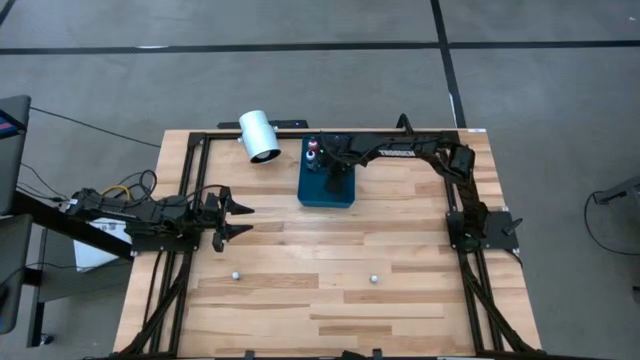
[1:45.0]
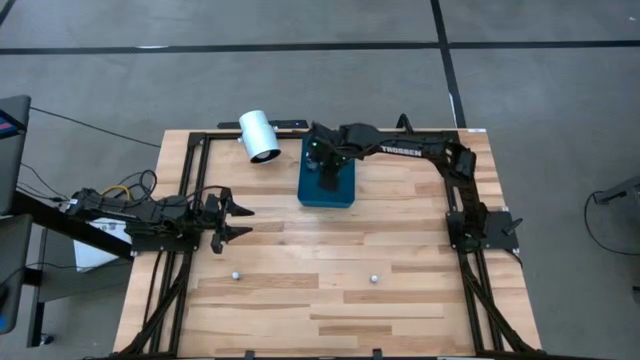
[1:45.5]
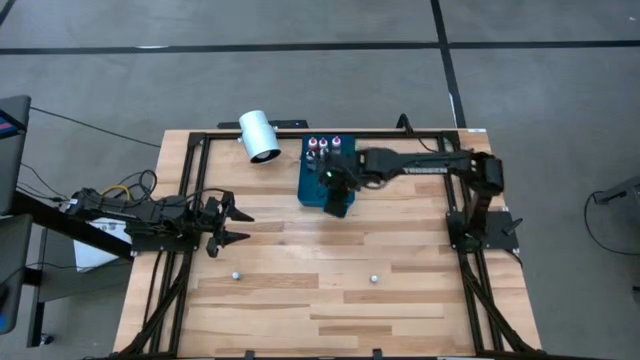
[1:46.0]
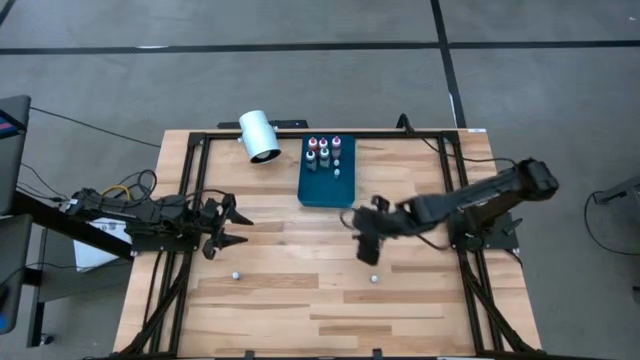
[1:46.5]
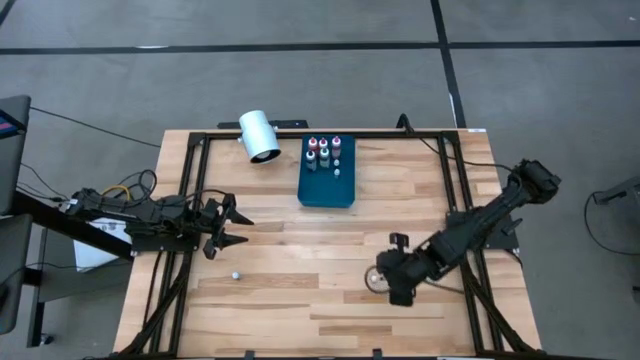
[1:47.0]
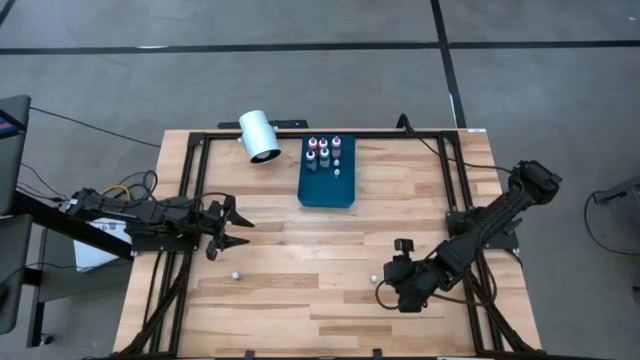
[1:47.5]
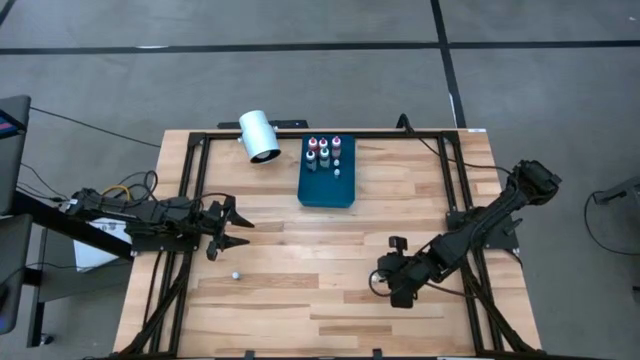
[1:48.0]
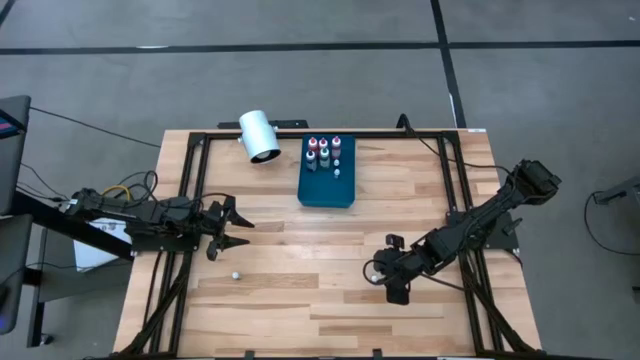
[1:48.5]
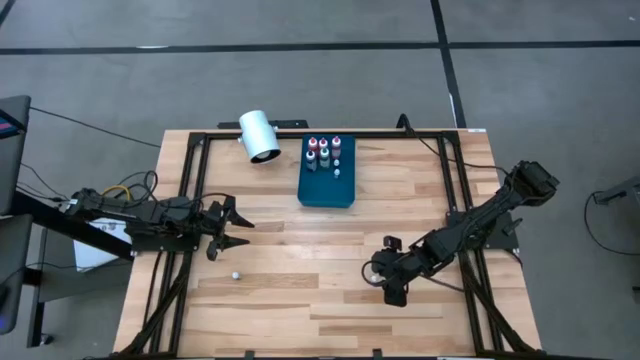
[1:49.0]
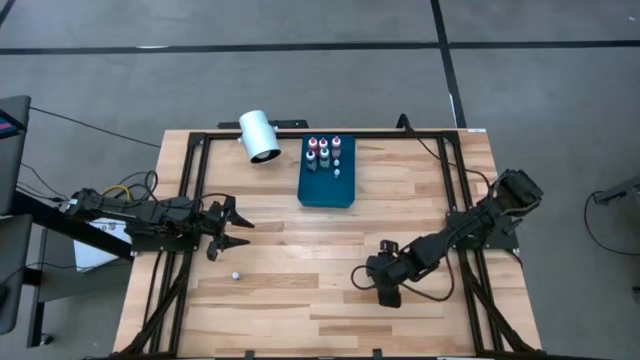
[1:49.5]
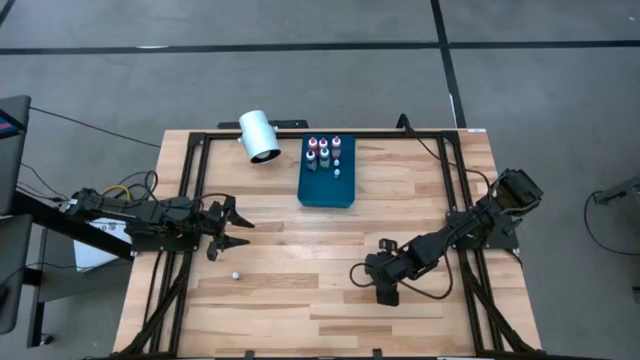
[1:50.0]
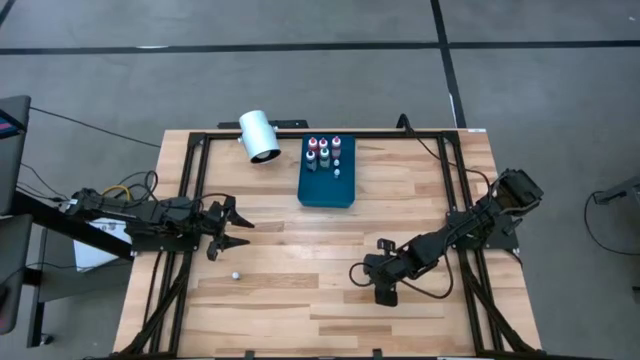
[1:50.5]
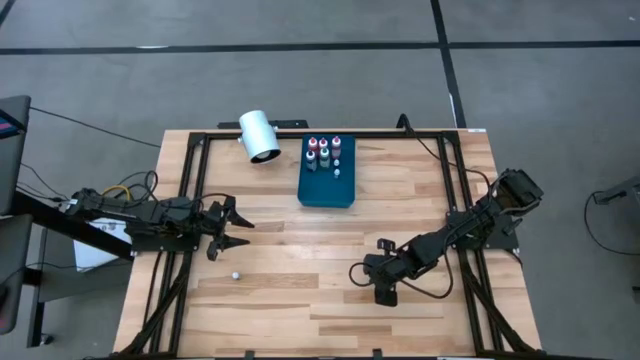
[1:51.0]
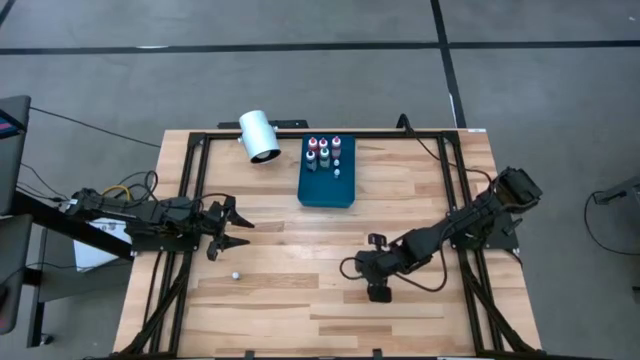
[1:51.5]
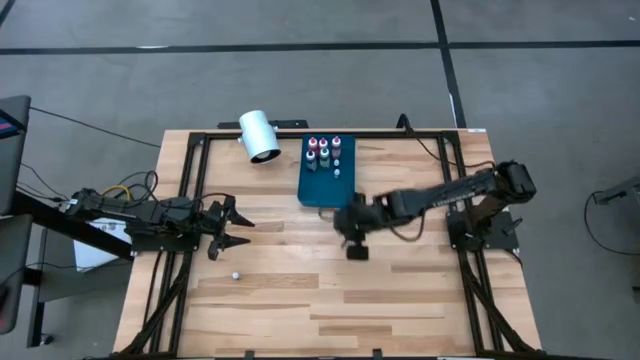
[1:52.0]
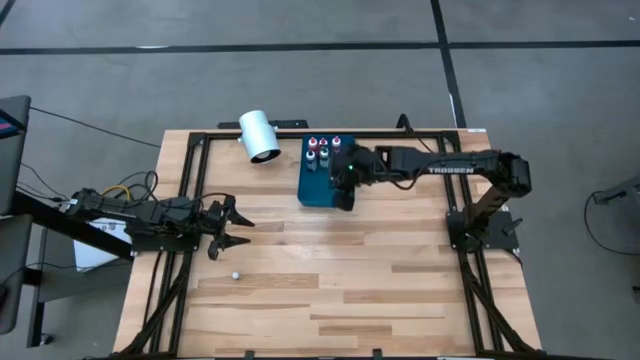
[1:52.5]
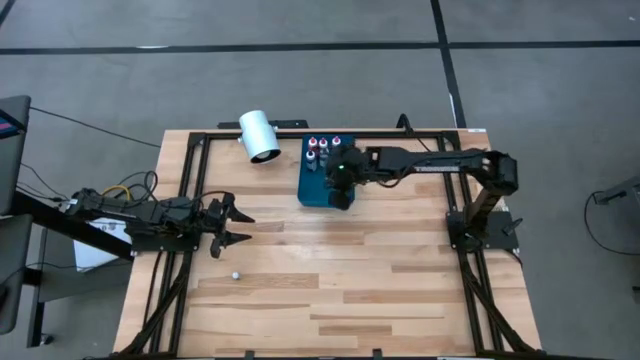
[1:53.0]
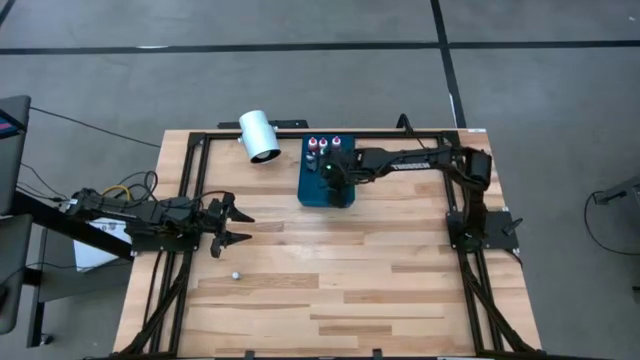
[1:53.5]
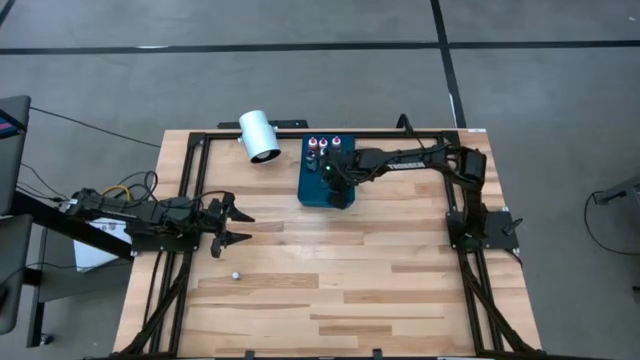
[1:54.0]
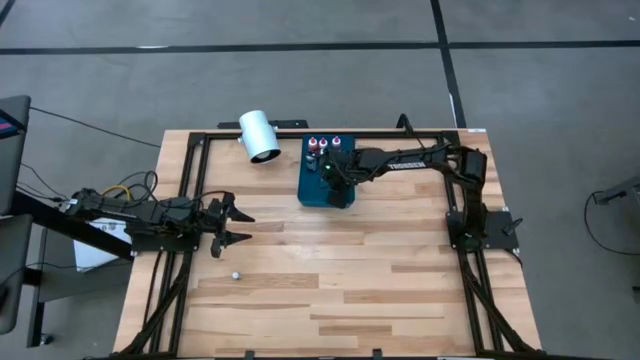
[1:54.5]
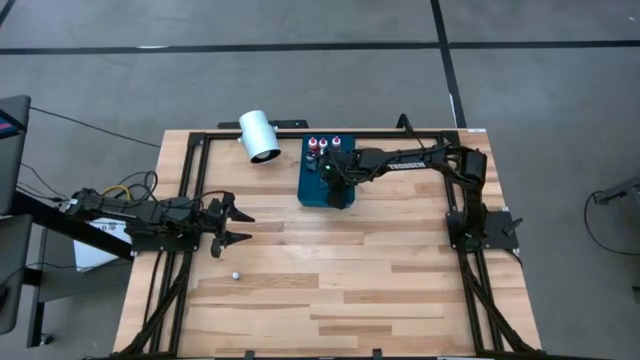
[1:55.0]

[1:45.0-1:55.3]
Task: Pick & Place food coloring
Put the small green food coloring bottle into the blue bin

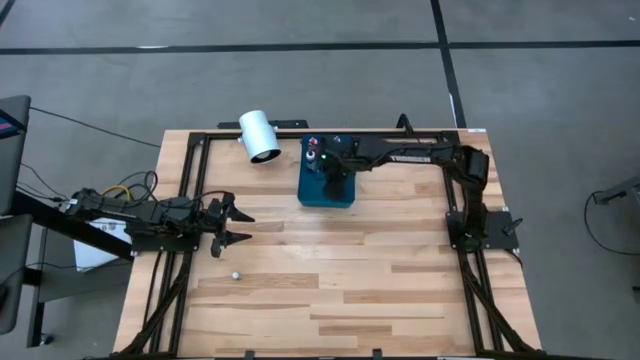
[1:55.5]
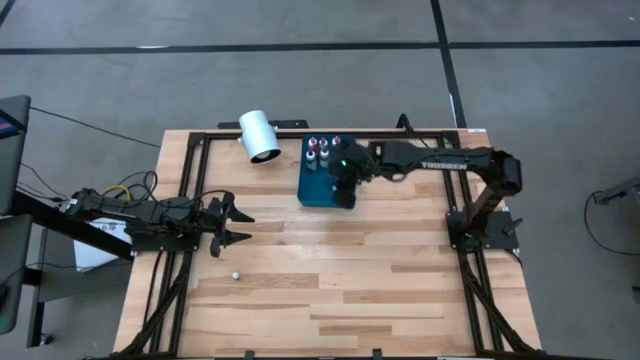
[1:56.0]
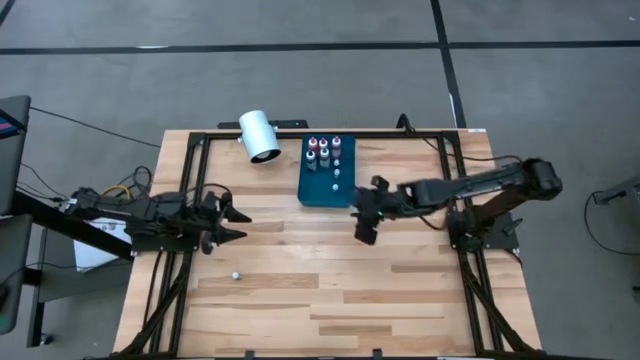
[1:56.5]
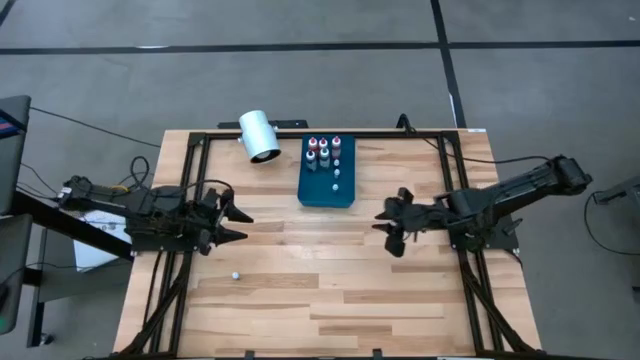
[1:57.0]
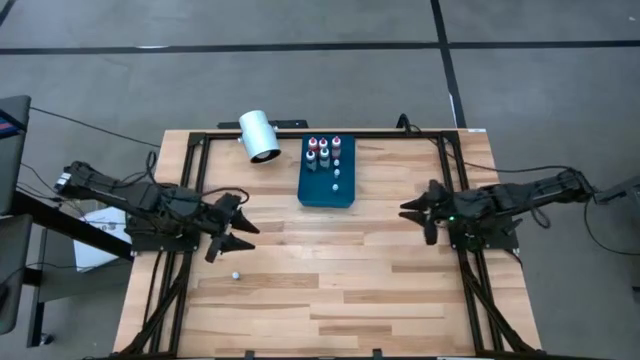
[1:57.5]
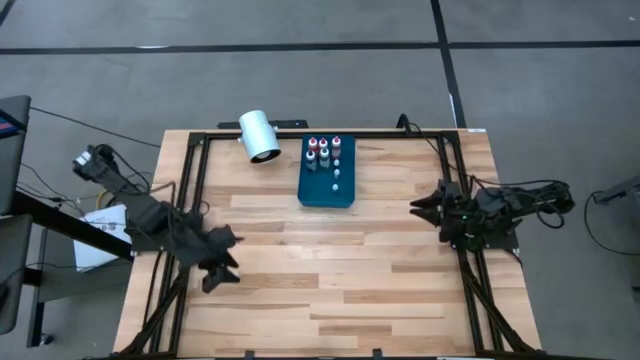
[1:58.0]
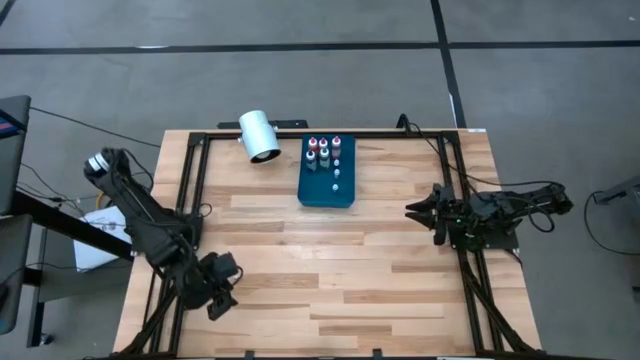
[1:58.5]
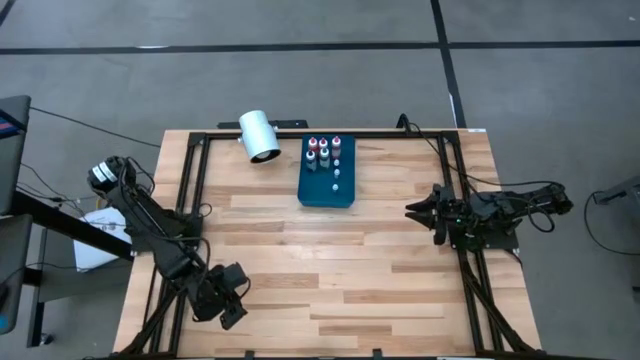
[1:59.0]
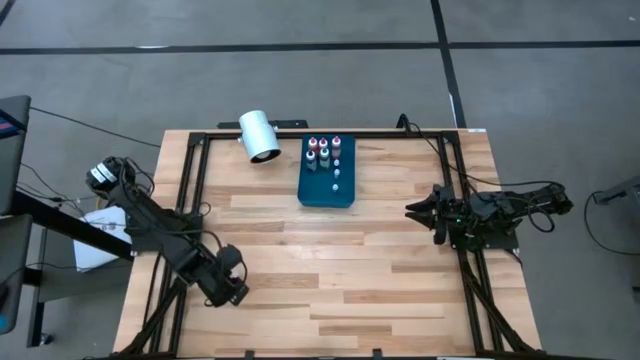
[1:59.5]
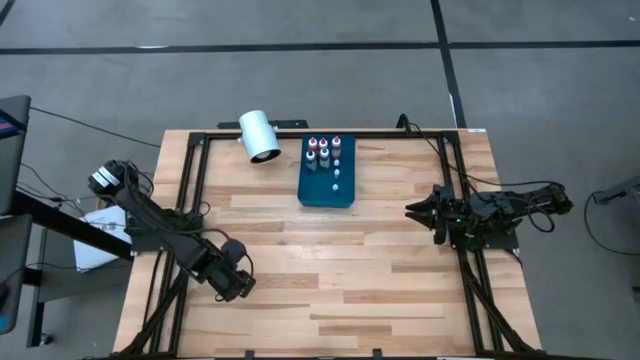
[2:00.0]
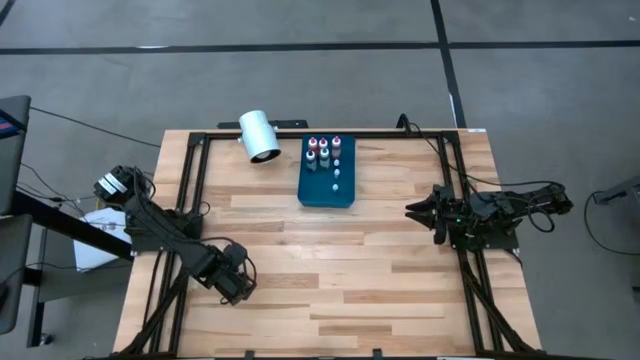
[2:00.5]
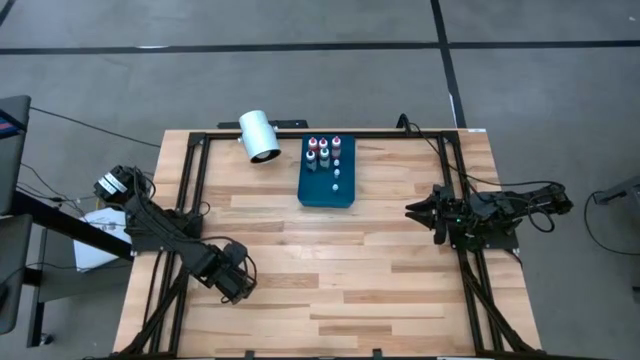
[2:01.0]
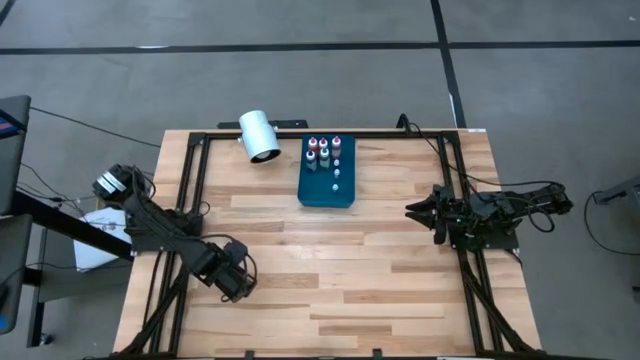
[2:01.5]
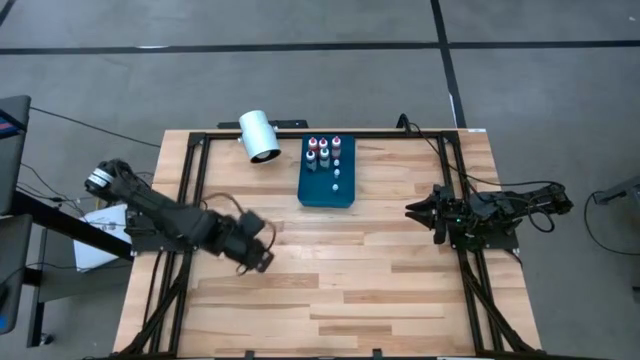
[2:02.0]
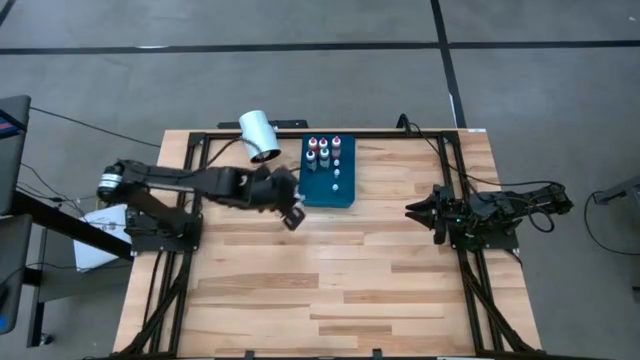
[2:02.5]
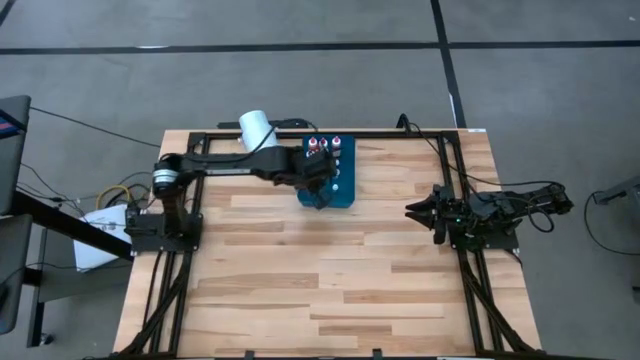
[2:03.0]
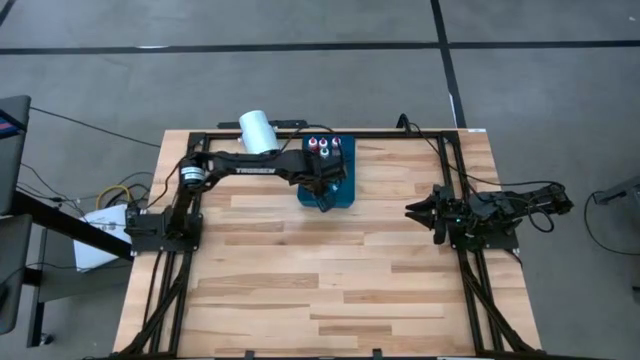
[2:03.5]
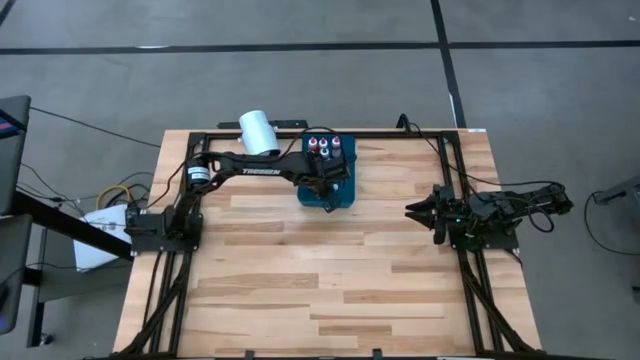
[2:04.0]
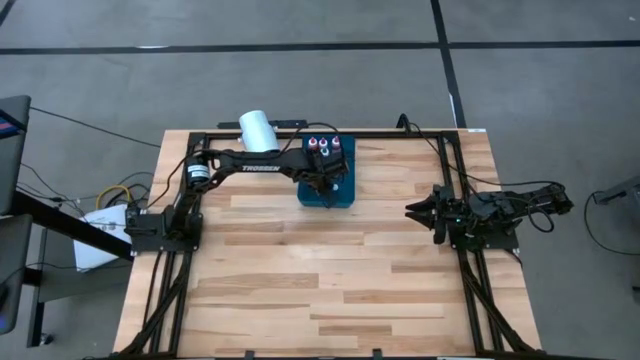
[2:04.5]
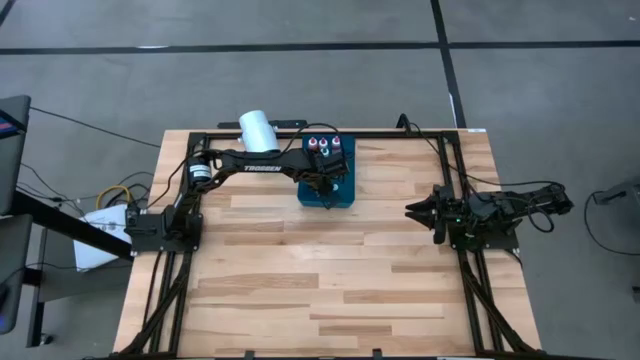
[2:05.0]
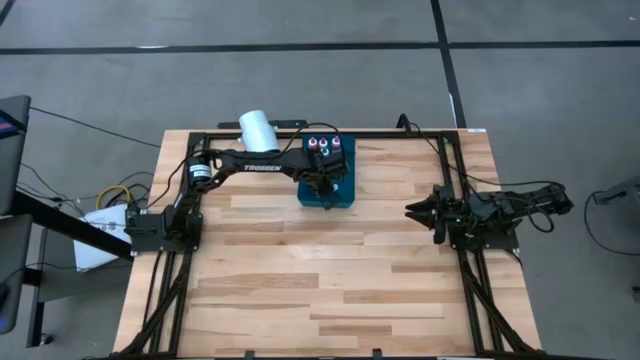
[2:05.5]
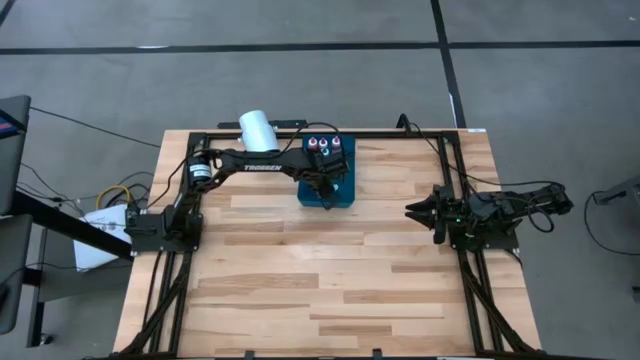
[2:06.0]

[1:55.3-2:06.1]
Put the small blue food coloring bottle into the blue bin

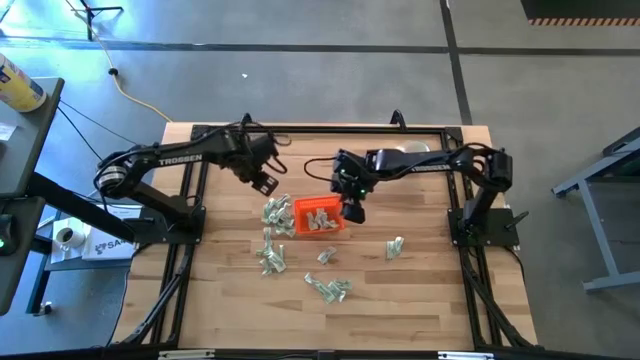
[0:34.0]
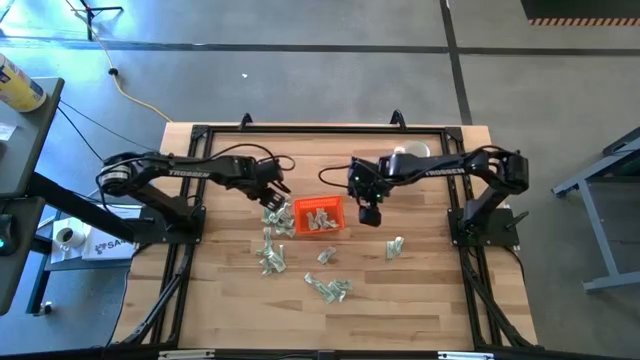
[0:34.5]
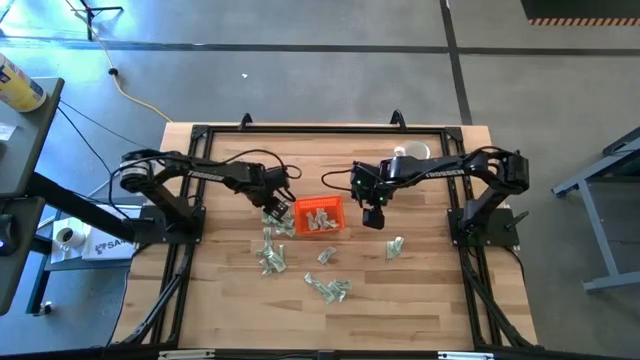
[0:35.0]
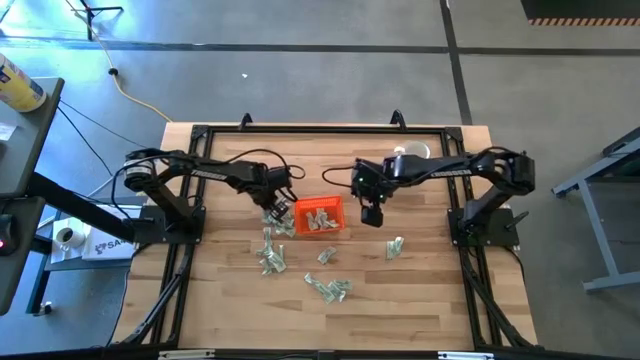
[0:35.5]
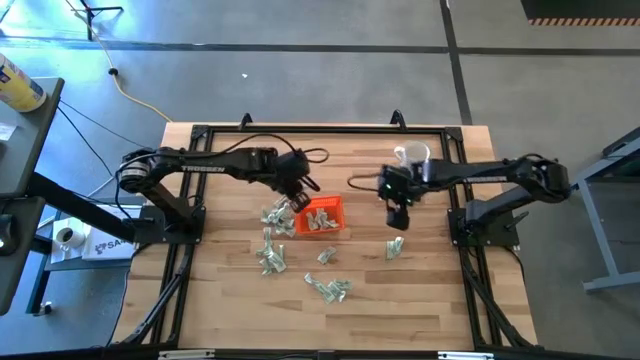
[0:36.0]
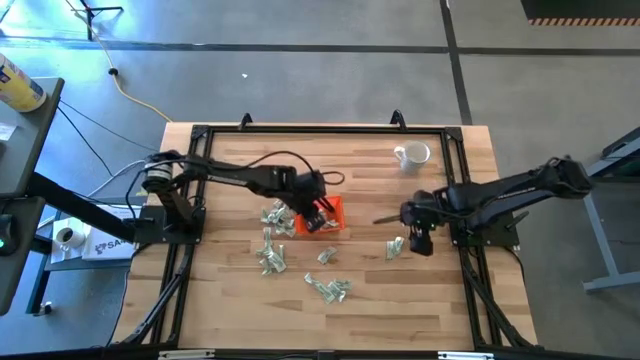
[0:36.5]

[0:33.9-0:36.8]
Task: Pick and place Stevia / Truvia into bins
Put the stevia packet into the orange bin
